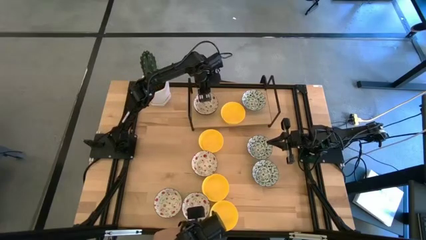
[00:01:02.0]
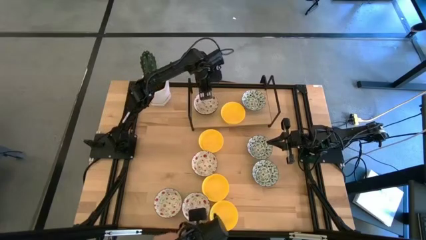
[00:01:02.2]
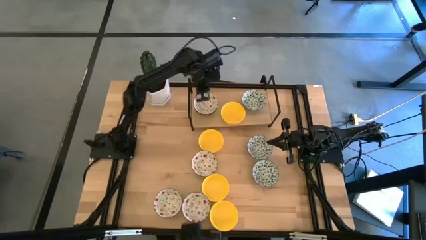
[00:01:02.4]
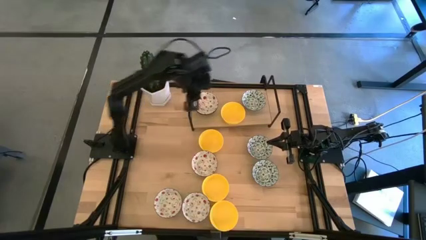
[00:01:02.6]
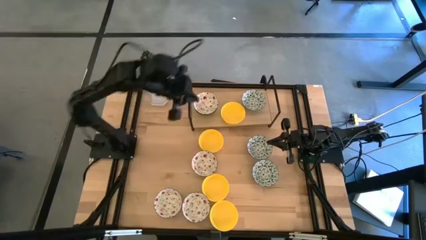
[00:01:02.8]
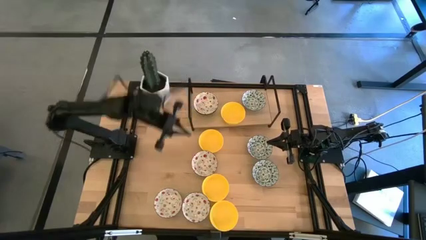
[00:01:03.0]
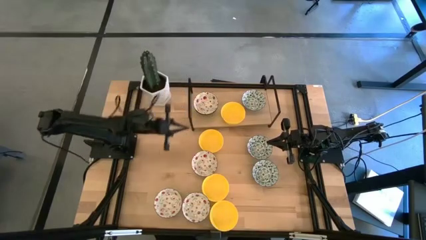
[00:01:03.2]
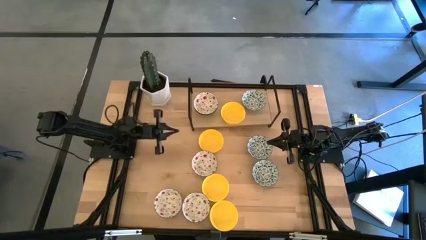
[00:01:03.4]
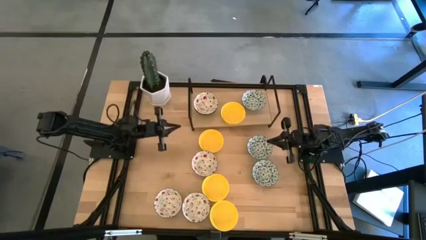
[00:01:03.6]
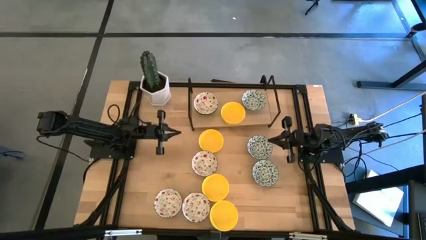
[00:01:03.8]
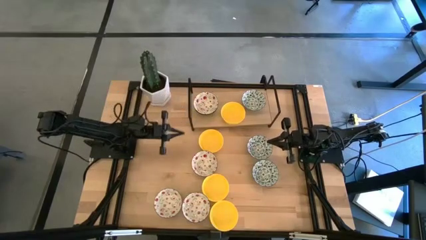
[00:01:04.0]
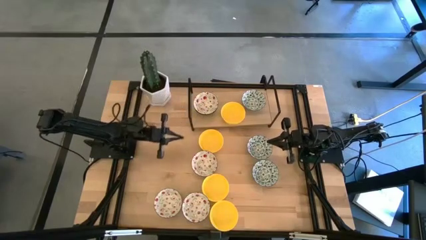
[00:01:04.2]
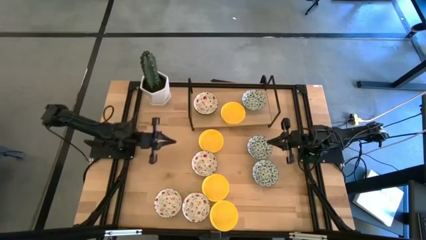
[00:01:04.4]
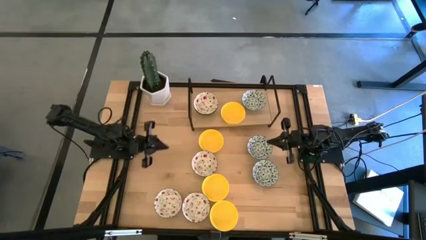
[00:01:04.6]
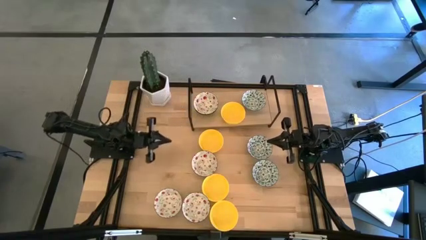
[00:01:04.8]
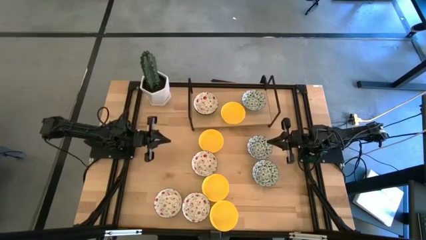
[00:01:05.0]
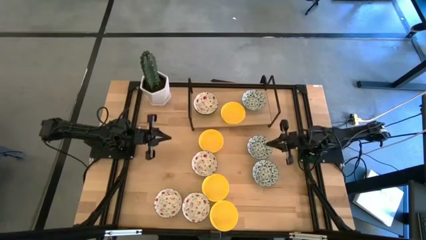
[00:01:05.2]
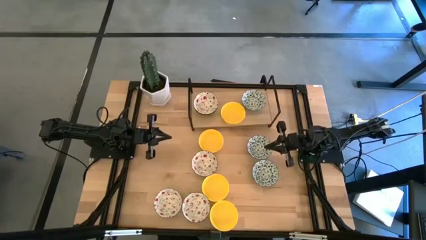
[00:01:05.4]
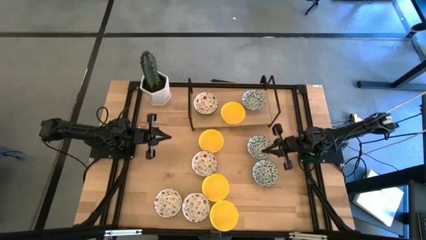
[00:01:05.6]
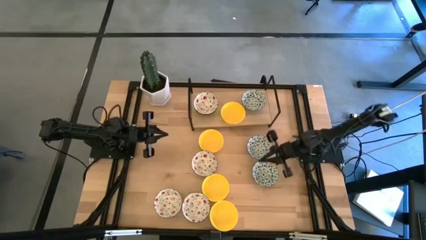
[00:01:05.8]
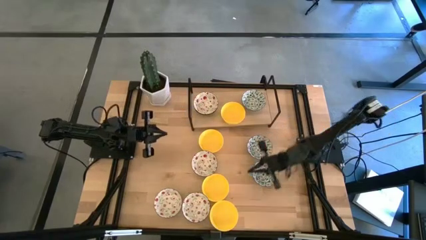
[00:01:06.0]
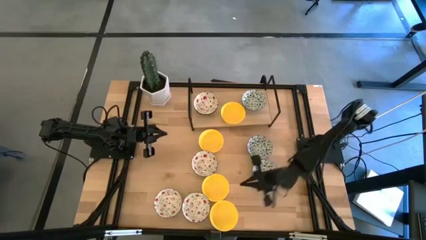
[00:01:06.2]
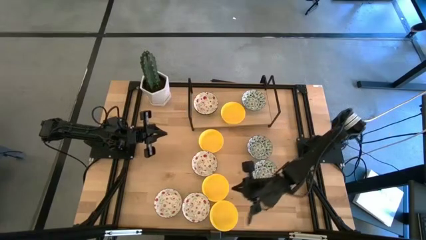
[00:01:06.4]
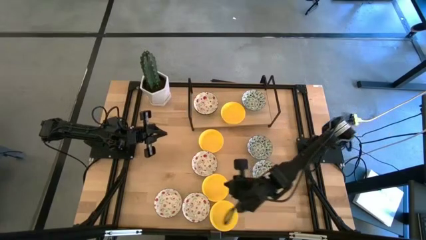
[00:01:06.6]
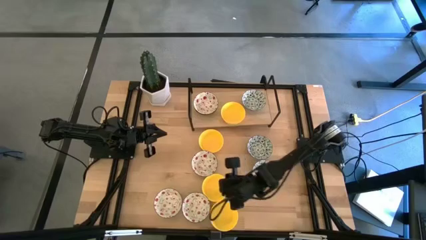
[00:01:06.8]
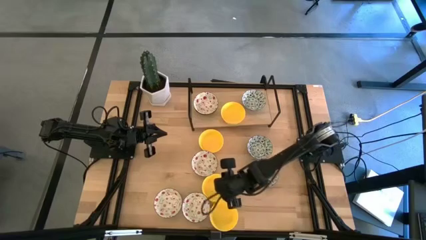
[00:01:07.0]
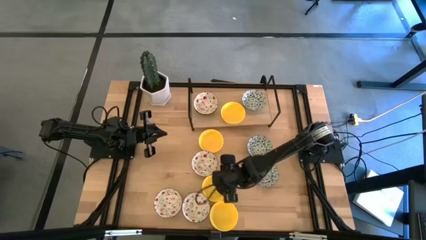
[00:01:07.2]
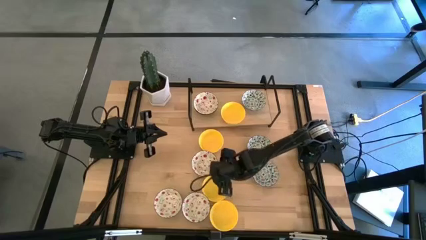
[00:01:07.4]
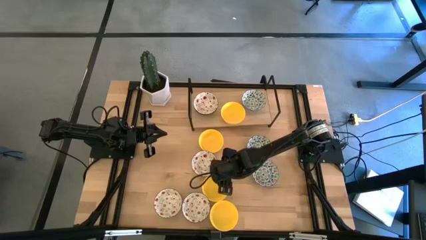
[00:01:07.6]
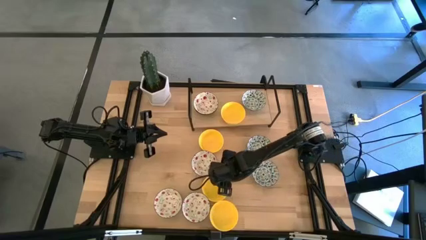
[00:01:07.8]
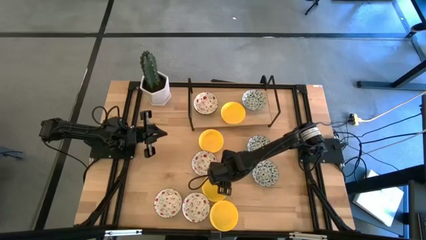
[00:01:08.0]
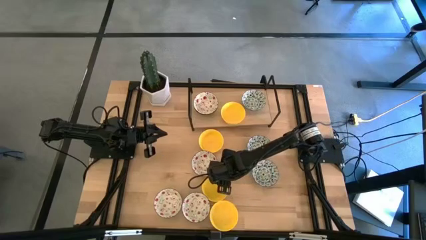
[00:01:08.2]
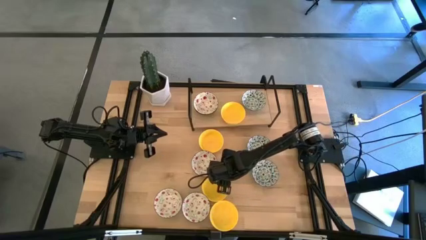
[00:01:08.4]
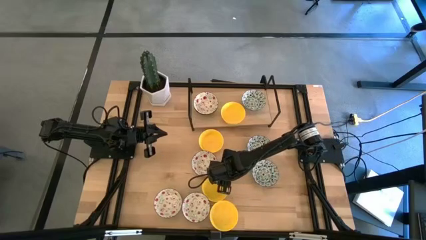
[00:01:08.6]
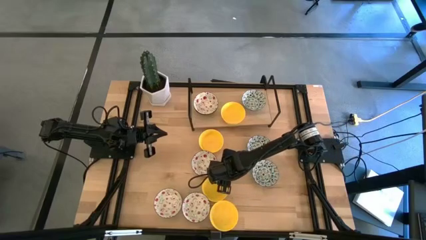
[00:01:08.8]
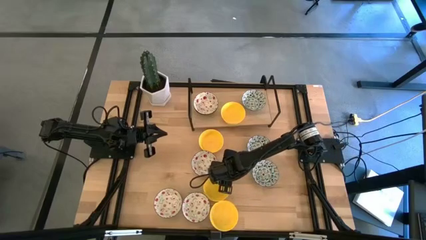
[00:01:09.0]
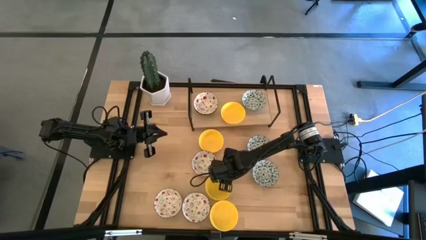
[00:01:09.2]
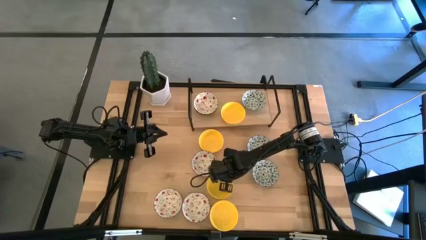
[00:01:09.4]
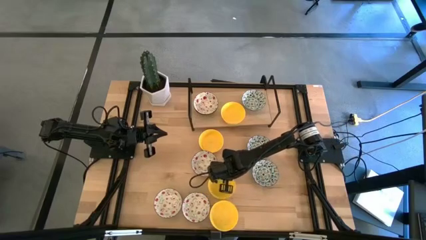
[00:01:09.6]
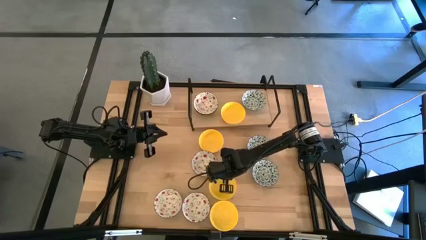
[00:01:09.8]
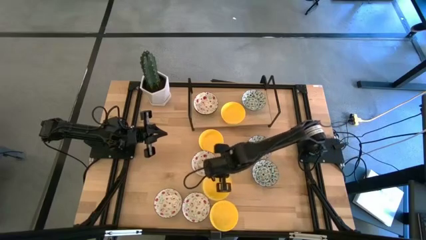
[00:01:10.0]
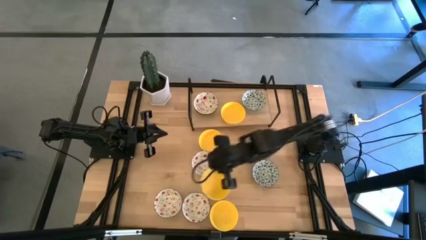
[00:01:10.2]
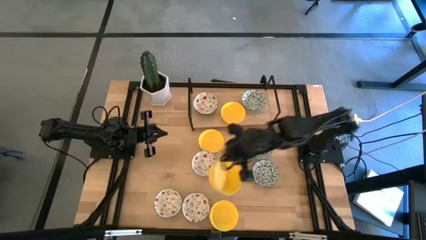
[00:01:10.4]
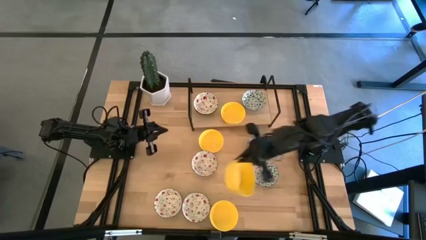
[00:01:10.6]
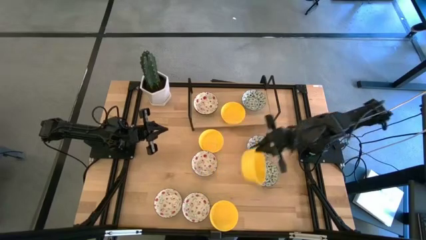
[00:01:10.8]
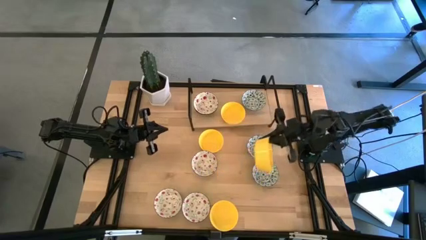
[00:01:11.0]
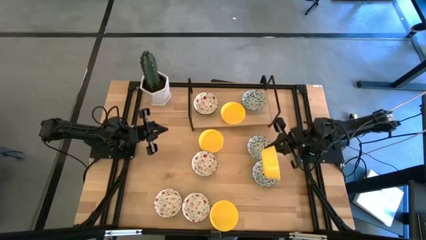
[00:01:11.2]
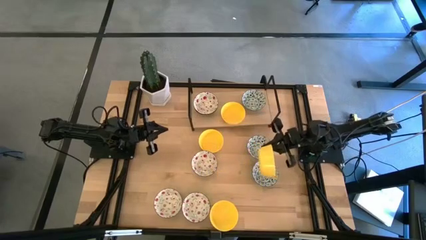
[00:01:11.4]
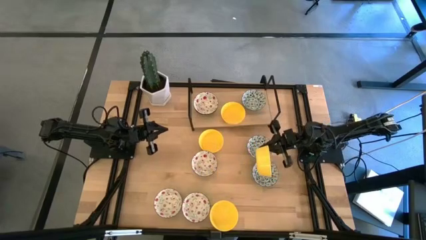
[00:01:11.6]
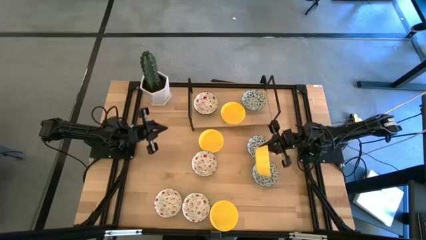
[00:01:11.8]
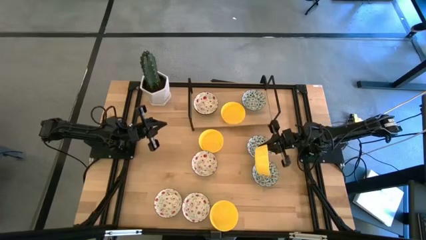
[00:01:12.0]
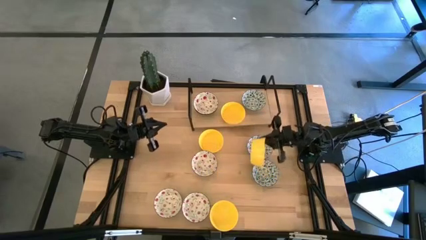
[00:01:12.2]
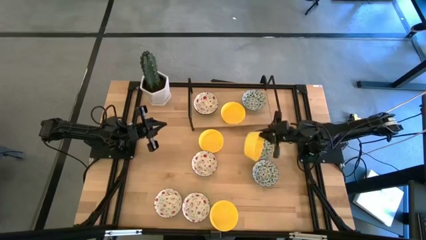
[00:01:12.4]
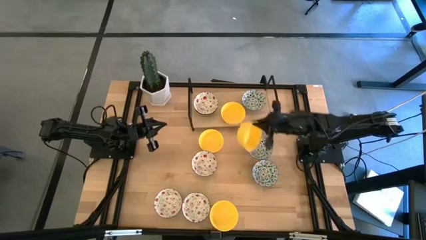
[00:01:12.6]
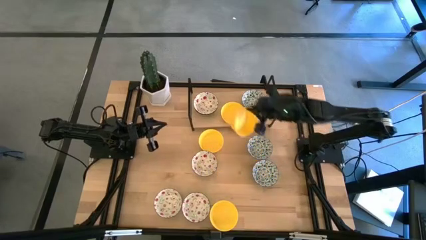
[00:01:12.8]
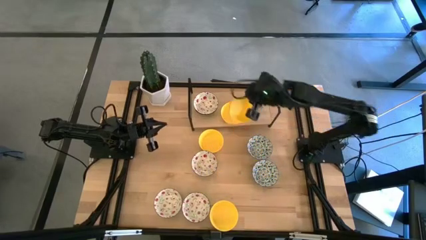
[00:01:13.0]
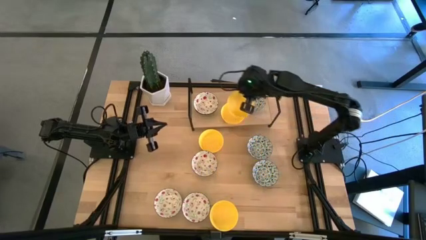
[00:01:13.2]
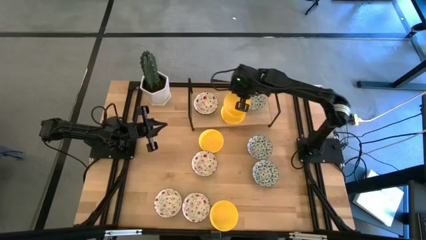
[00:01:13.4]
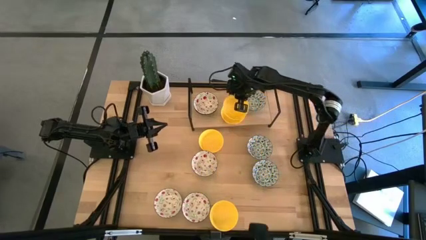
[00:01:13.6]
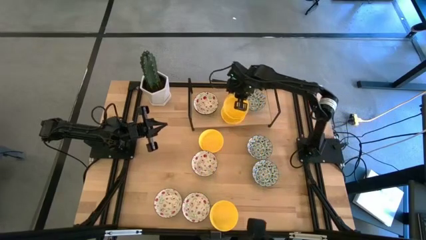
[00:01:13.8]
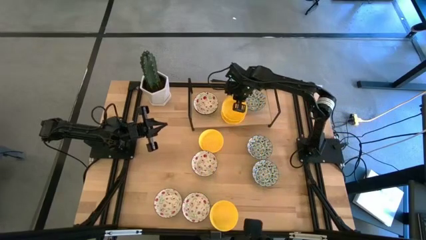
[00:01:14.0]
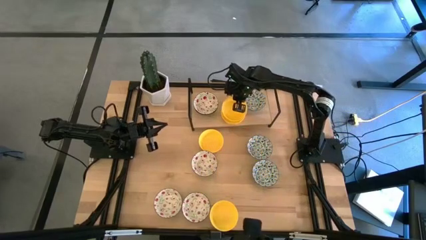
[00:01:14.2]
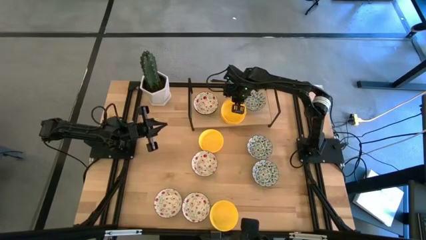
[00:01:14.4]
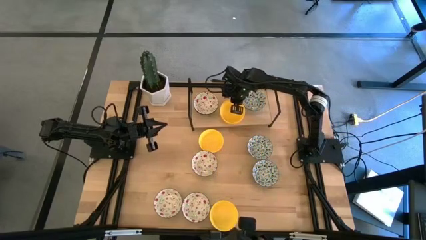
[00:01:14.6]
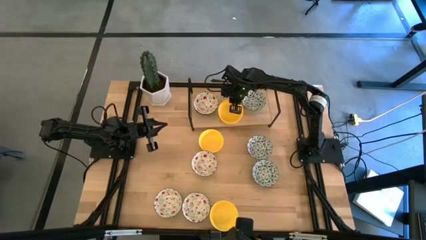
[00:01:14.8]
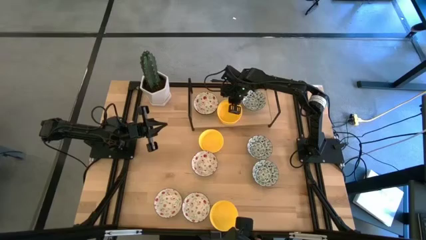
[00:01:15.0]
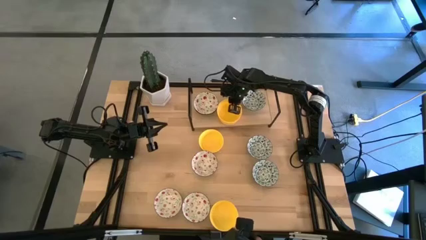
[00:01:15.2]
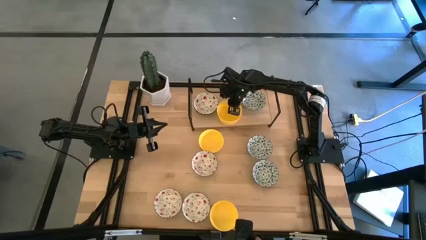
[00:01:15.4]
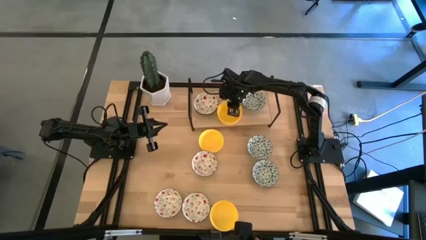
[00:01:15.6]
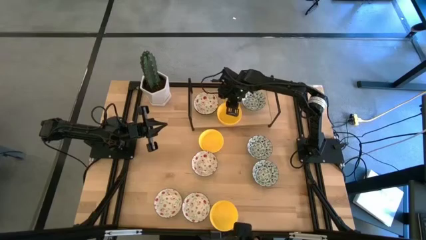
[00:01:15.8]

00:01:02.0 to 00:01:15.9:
Task: Pick & Place Mini bowls
Stack the yellow bowl on the yellow bowl on the shelf
